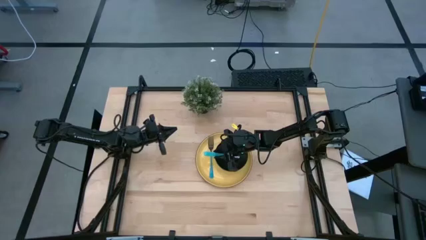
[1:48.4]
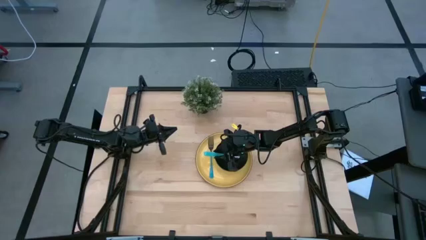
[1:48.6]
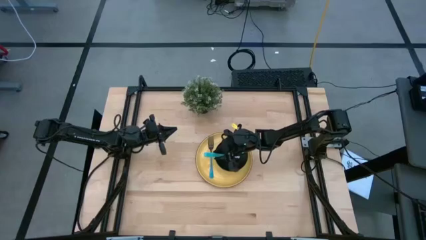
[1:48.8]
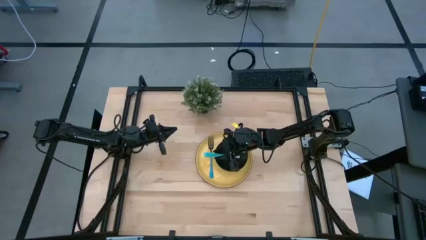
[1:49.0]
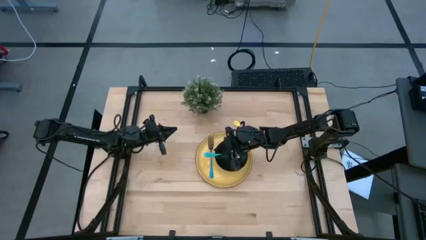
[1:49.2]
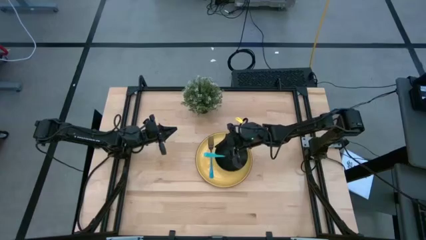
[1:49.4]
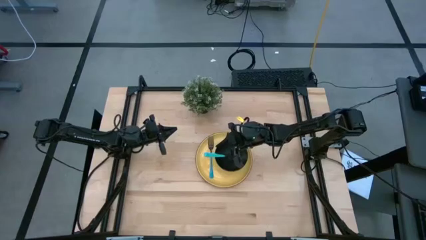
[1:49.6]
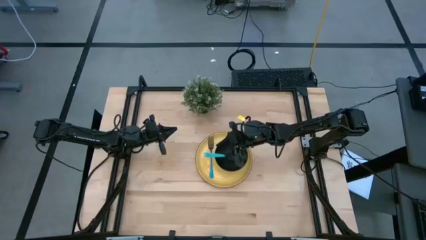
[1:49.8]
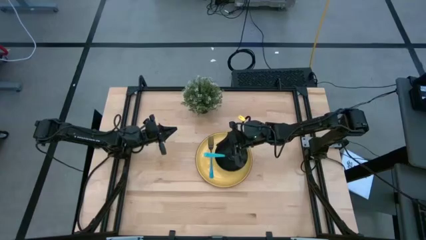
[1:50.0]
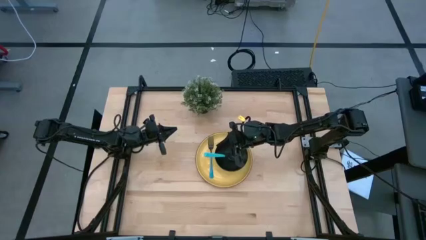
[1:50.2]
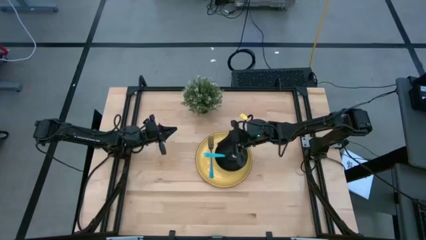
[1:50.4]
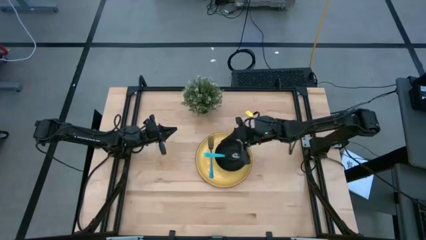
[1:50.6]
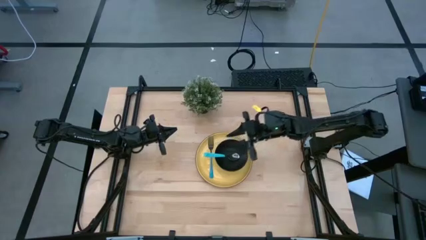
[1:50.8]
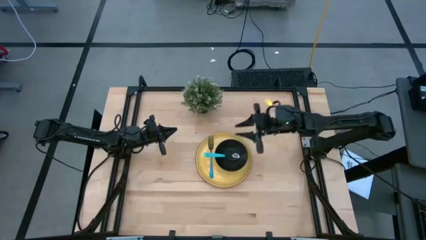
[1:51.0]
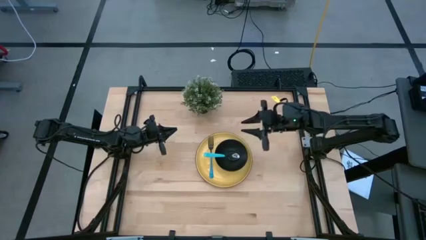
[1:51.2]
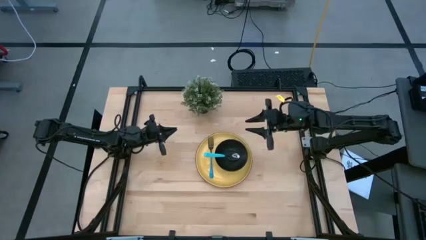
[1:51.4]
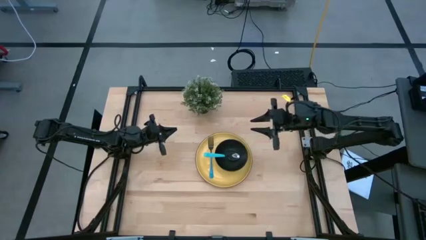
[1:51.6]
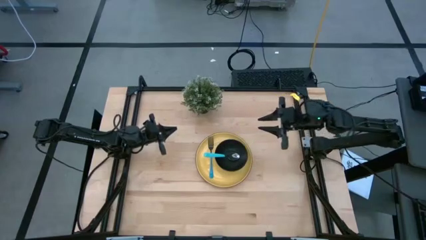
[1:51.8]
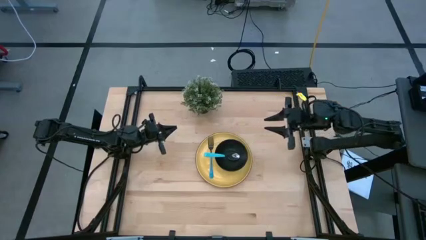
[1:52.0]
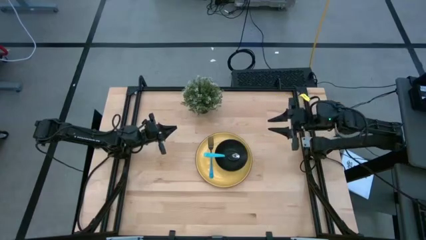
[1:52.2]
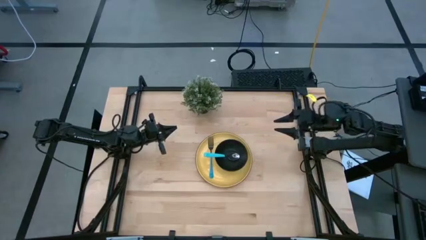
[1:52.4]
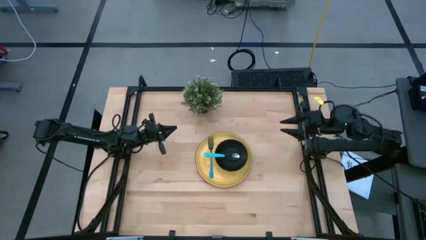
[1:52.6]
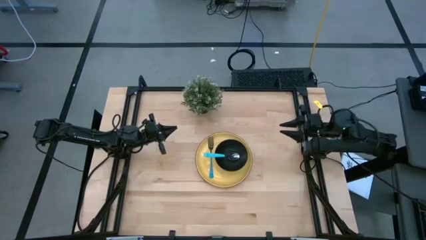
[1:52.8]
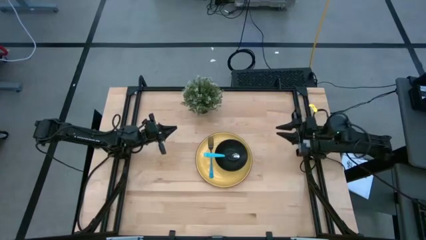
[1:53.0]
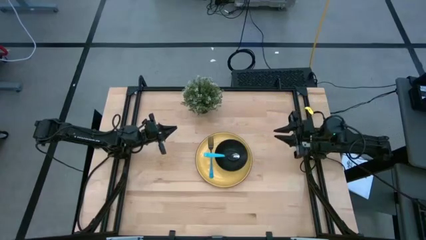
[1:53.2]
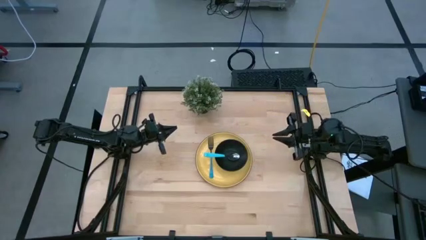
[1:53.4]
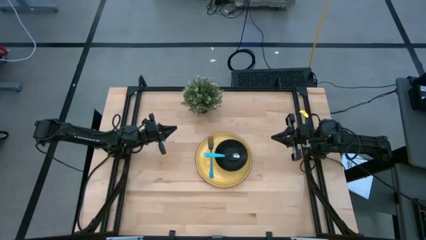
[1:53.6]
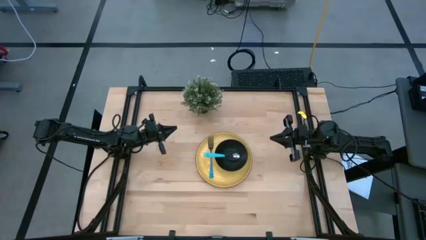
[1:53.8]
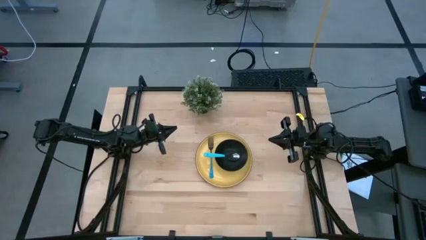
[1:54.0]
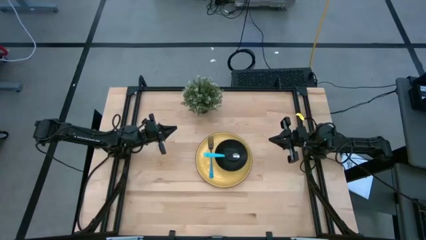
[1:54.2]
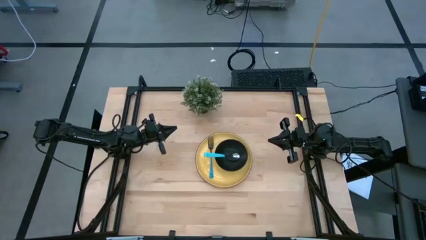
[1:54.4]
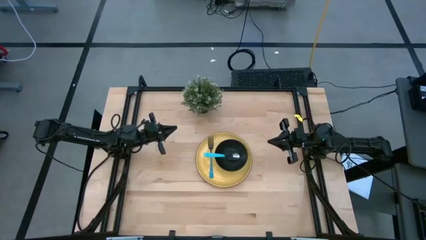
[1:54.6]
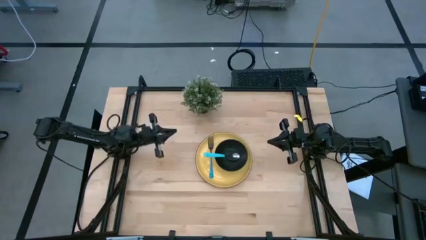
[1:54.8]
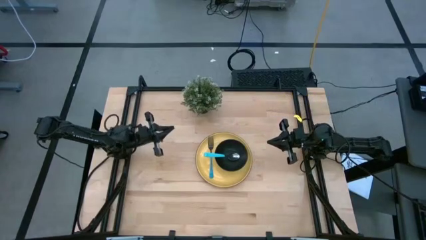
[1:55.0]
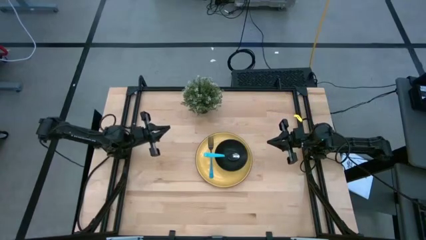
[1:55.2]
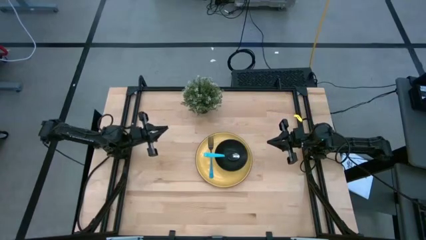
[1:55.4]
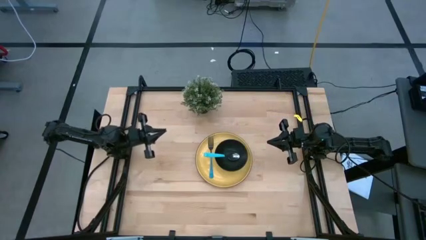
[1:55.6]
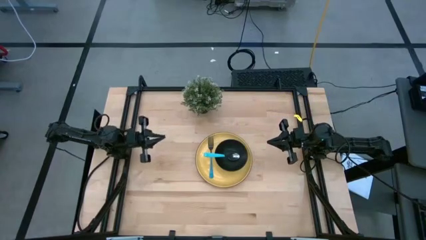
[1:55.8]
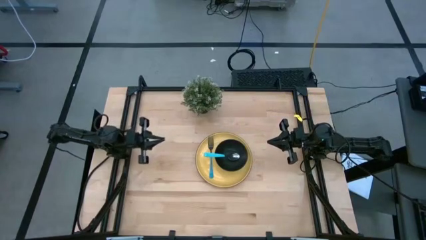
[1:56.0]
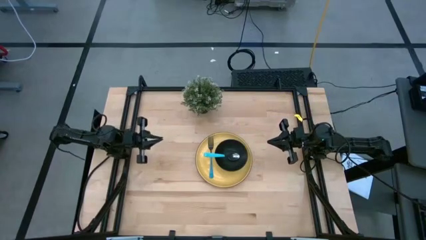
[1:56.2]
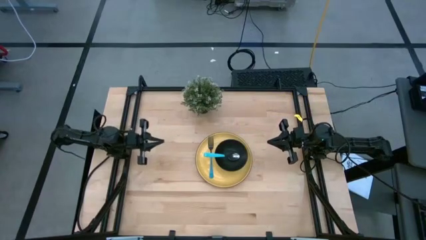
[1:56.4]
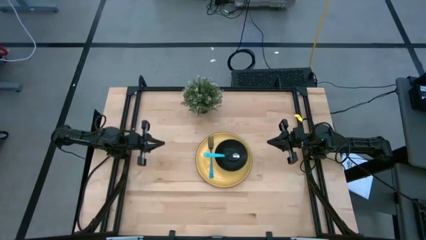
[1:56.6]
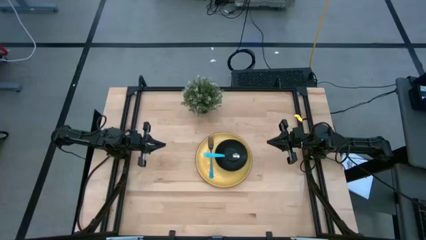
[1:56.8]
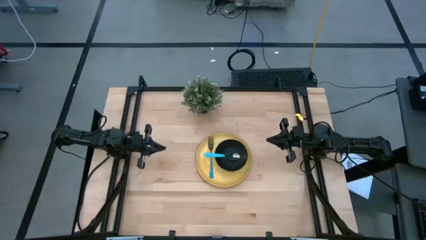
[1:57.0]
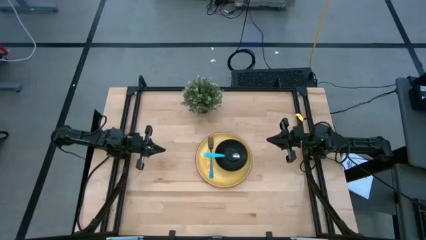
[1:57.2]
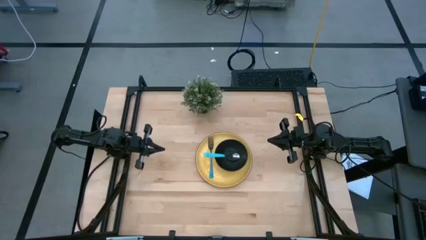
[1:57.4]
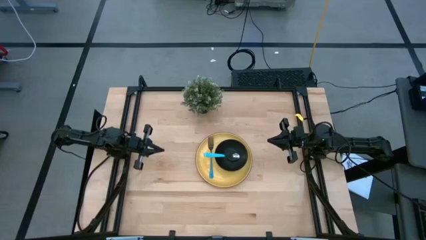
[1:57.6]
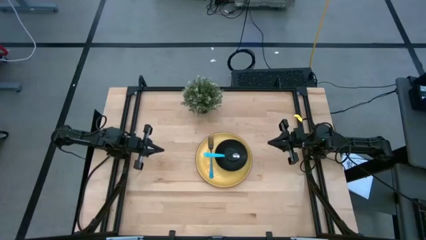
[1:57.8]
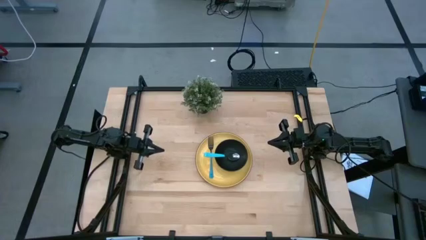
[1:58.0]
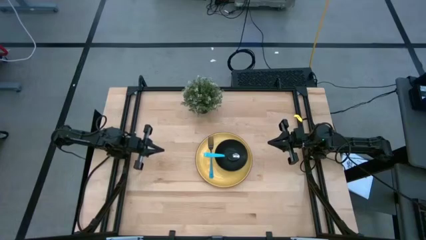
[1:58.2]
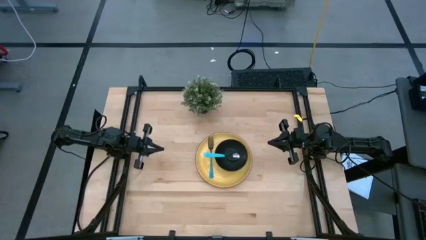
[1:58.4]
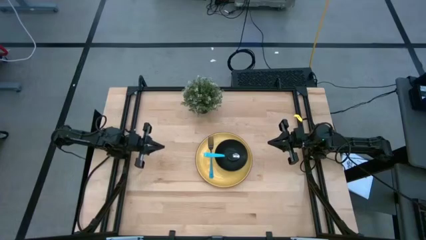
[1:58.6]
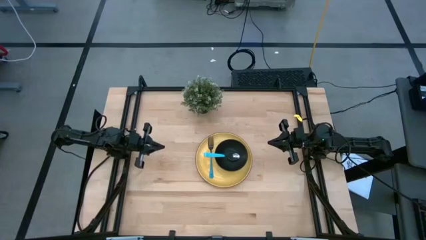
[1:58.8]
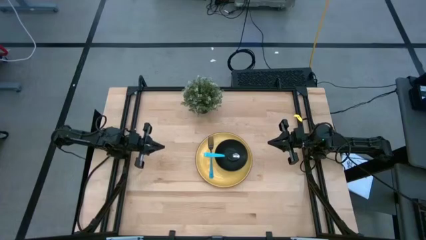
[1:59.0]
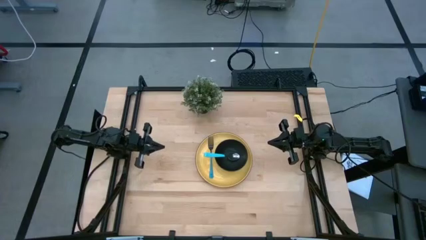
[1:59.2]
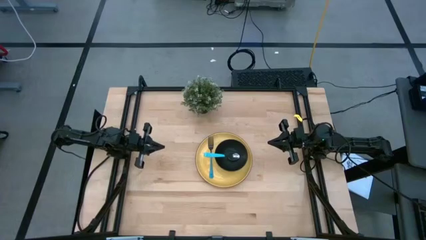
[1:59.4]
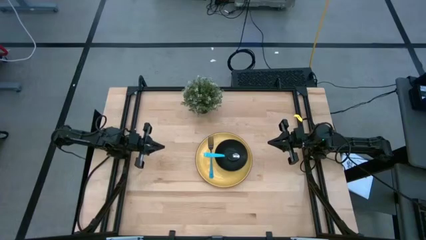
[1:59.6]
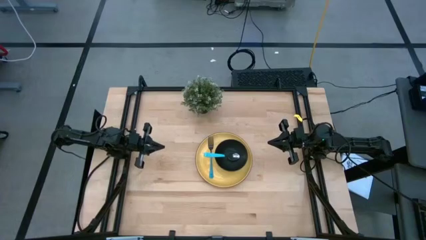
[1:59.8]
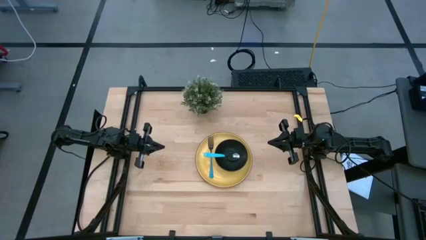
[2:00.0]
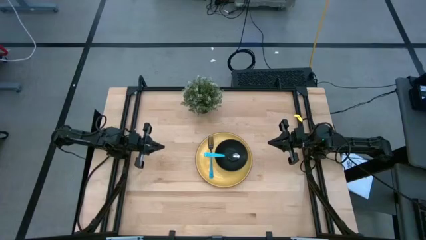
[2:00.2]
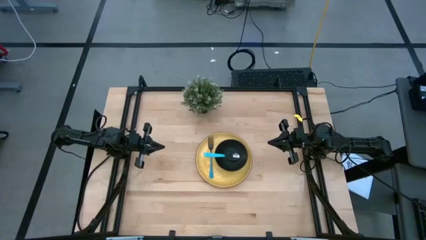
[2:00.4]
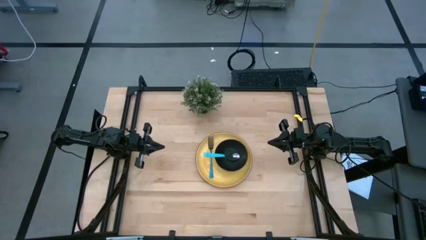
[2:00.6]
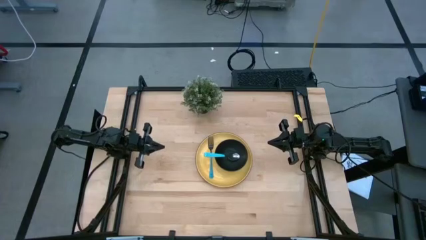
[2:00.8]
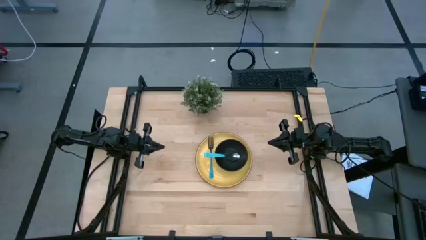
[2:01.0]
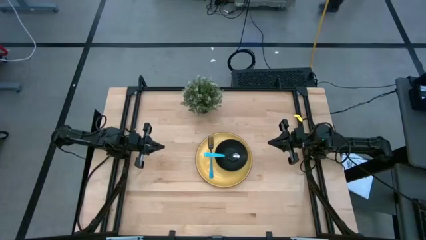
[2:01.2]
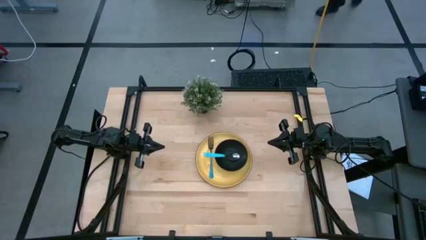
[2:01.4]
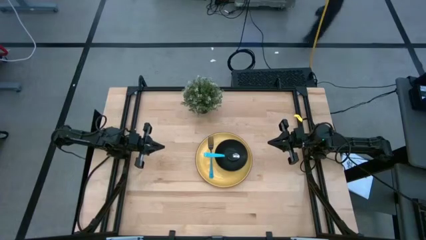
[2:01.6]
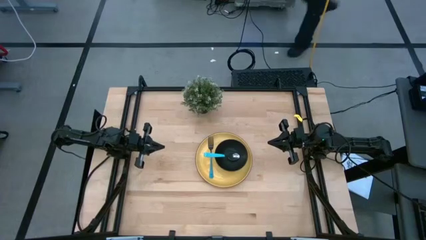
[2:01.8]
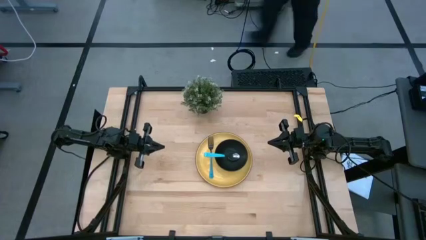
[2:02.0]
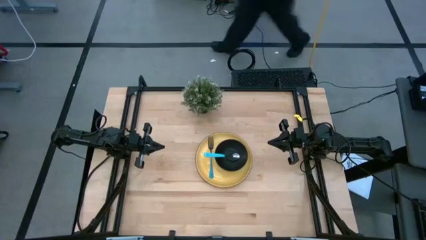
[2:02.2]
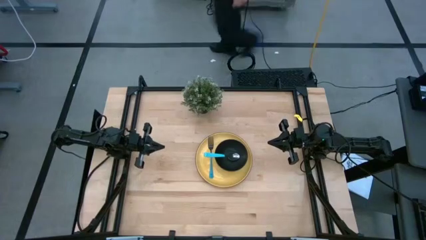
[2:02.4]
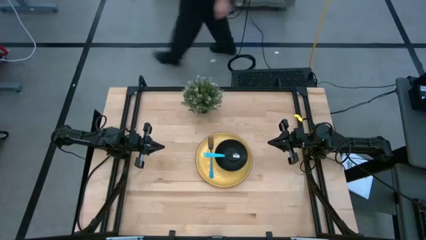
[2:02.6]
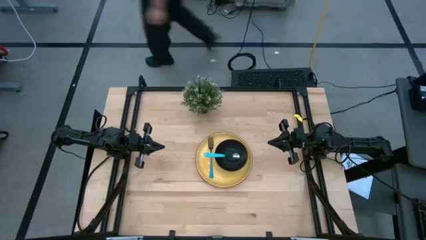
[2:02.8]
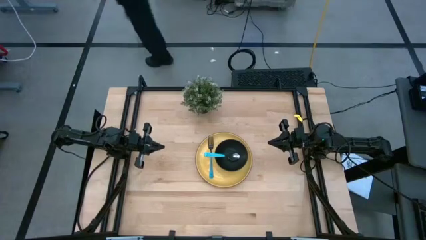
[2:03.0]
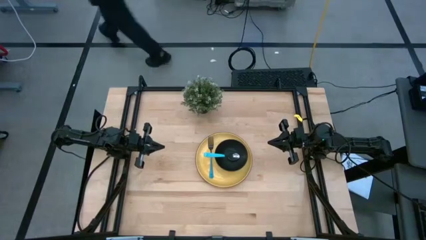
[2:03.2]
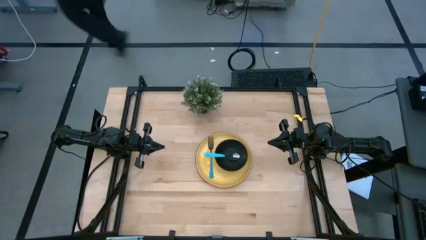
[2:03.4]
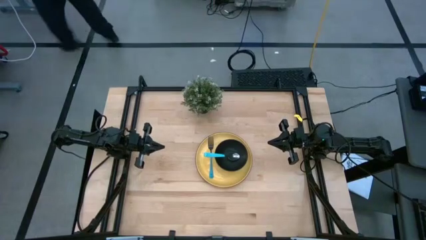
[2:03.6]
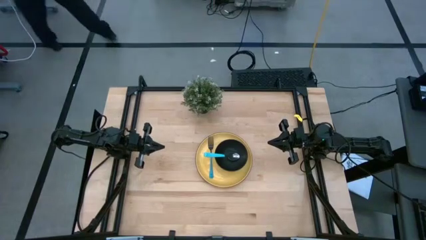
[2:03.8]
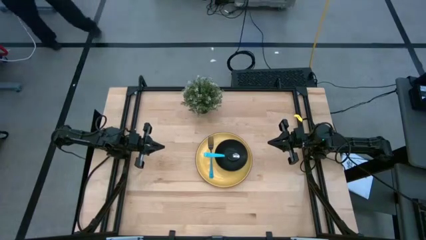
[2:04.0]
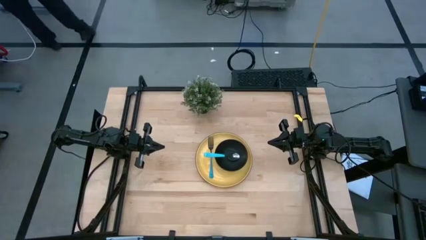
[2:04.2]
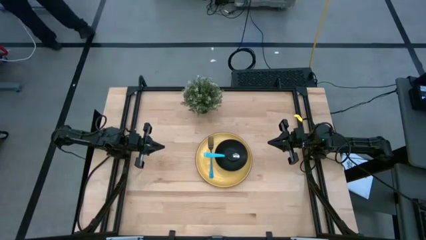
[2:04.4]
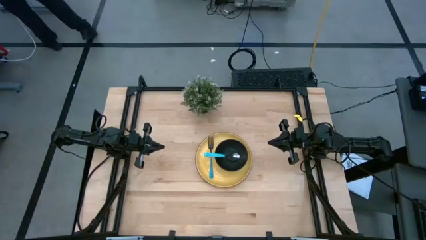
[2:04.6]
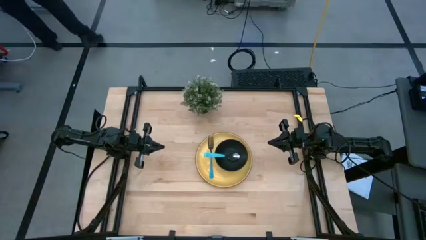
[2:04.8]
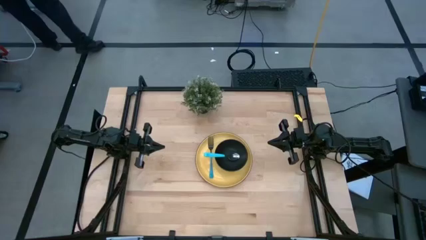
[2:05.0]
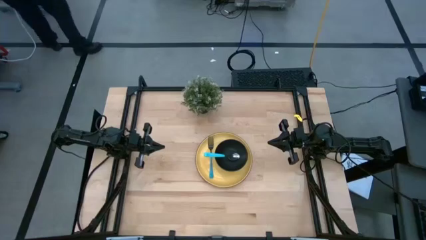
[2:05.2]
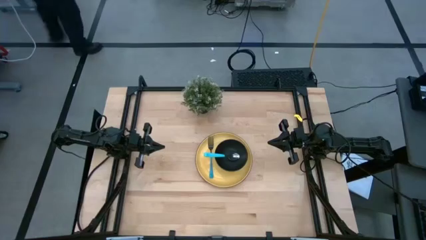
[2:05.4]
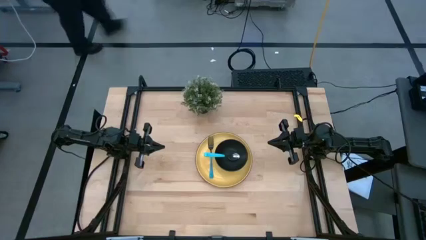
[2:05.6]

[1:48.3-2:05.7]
Task: Set table place
Return to Home Position
